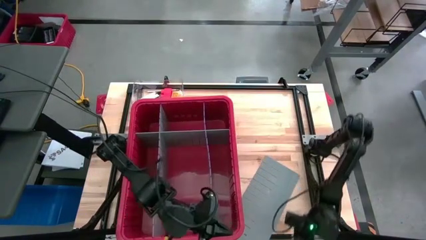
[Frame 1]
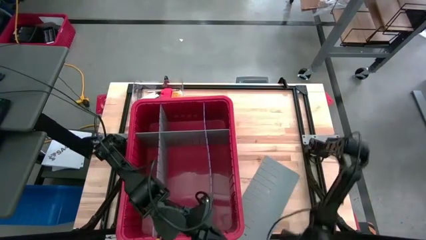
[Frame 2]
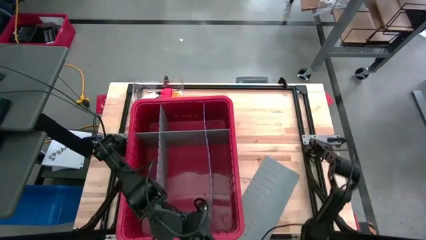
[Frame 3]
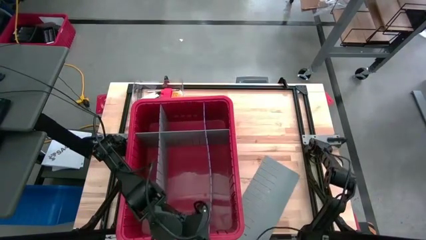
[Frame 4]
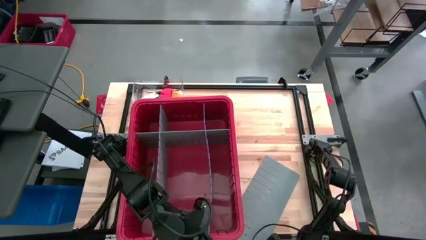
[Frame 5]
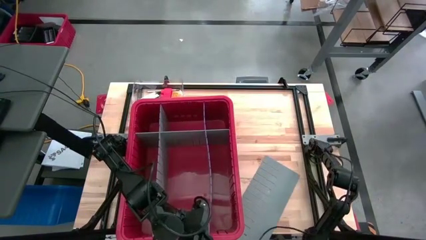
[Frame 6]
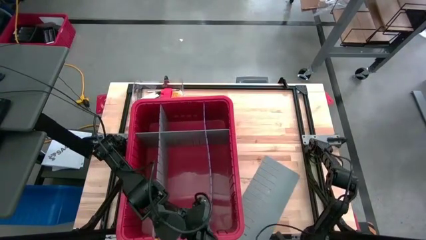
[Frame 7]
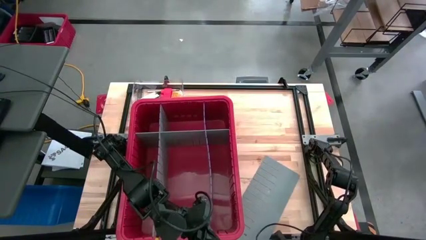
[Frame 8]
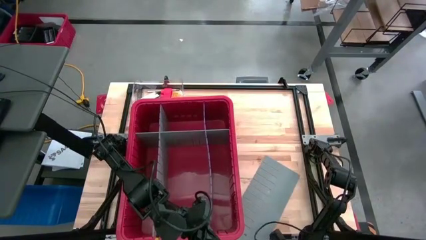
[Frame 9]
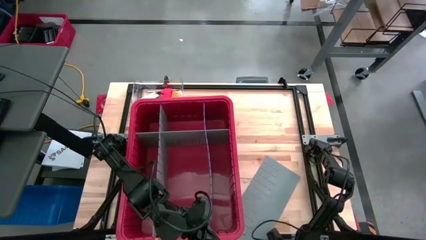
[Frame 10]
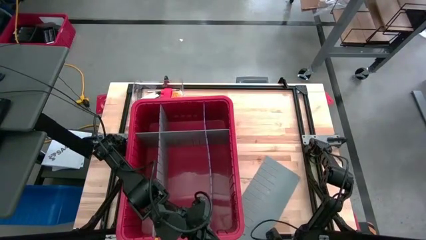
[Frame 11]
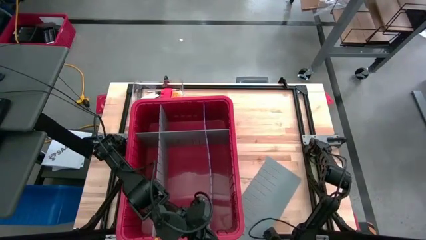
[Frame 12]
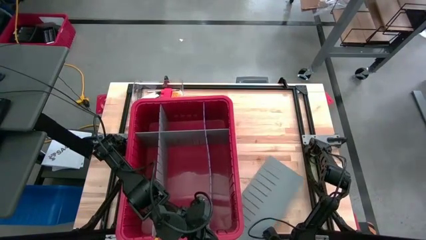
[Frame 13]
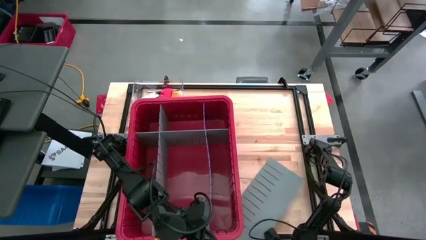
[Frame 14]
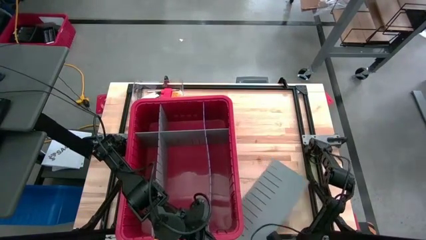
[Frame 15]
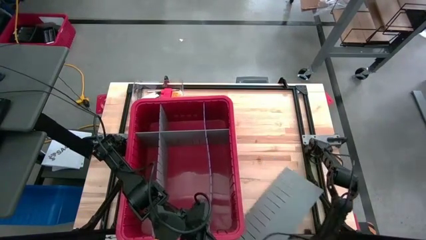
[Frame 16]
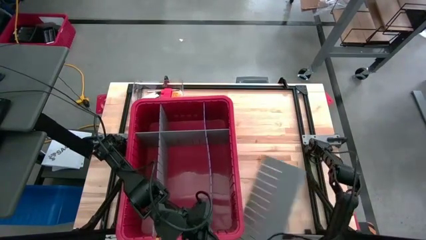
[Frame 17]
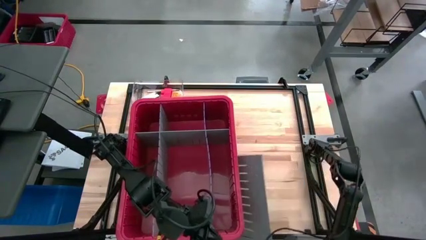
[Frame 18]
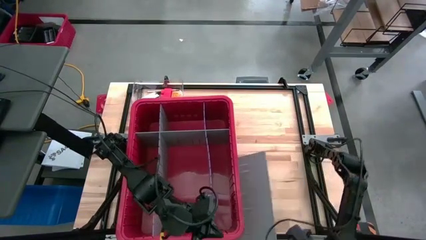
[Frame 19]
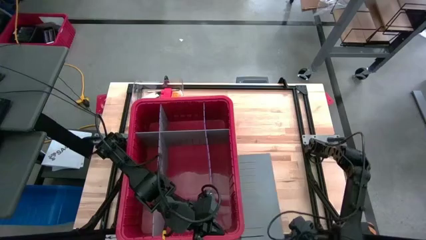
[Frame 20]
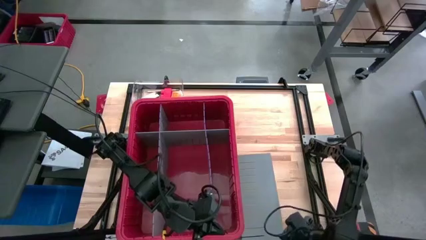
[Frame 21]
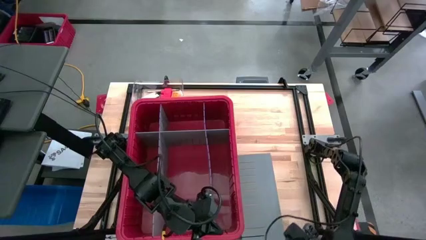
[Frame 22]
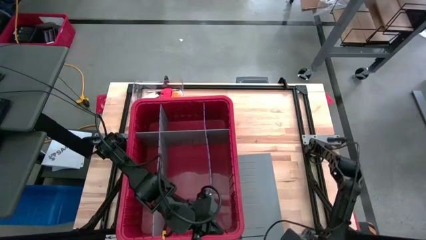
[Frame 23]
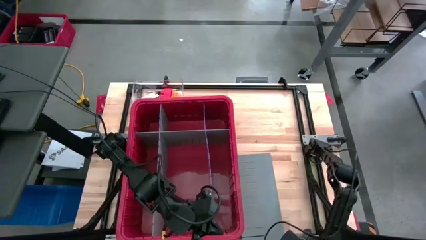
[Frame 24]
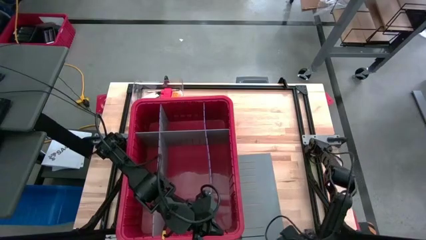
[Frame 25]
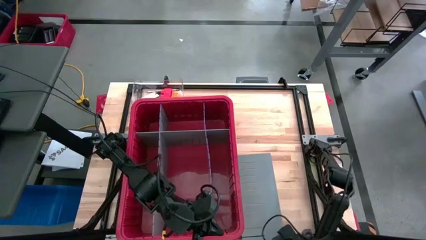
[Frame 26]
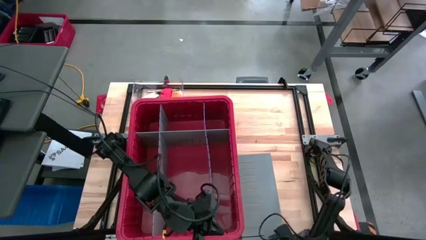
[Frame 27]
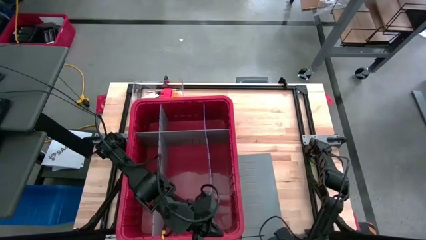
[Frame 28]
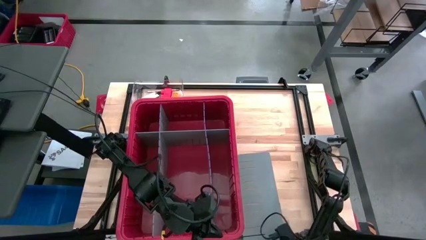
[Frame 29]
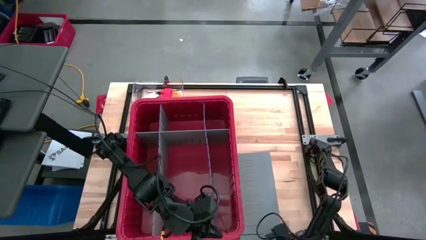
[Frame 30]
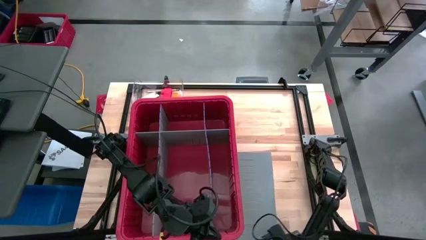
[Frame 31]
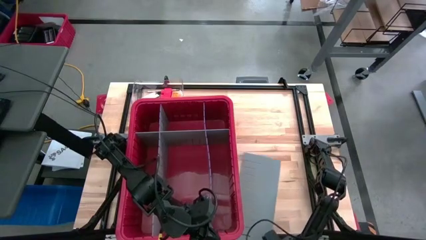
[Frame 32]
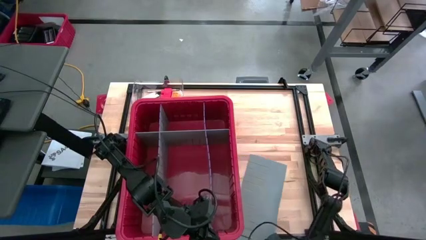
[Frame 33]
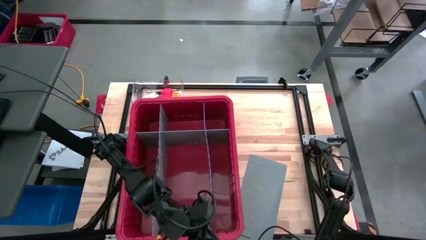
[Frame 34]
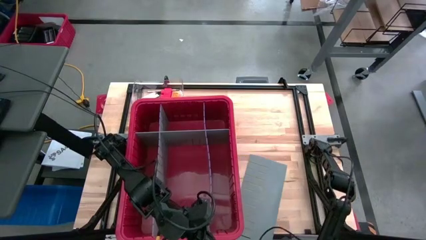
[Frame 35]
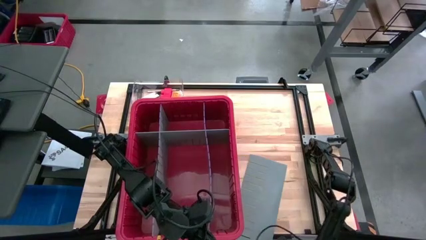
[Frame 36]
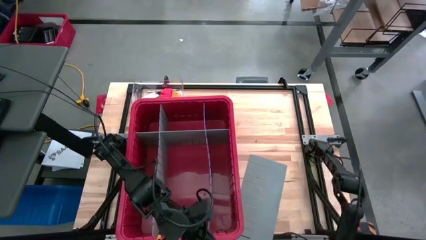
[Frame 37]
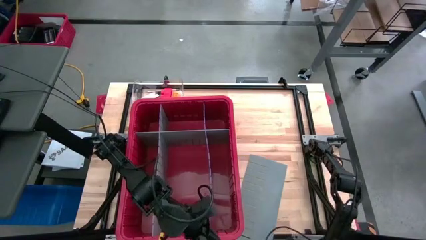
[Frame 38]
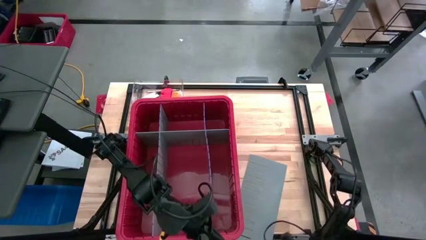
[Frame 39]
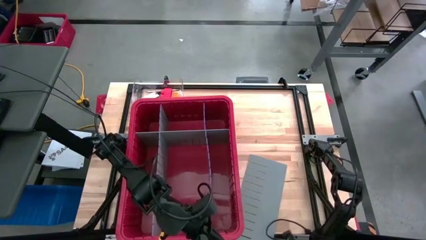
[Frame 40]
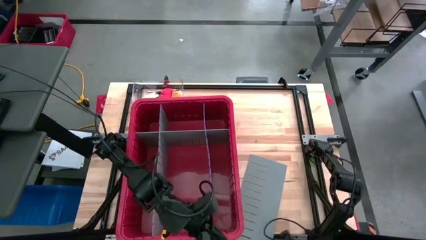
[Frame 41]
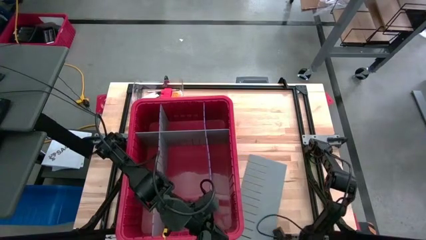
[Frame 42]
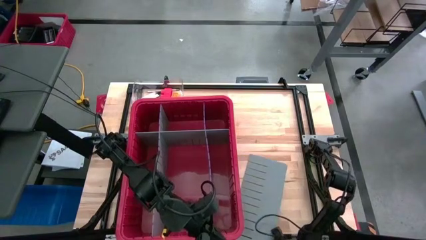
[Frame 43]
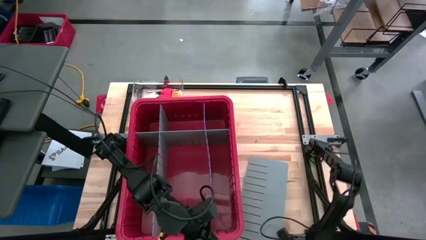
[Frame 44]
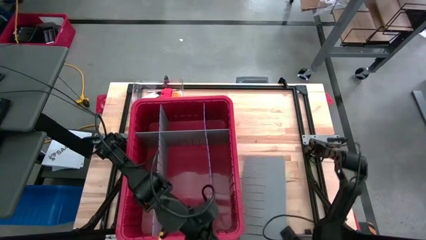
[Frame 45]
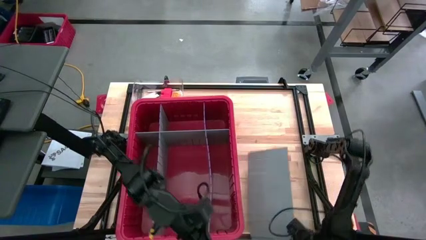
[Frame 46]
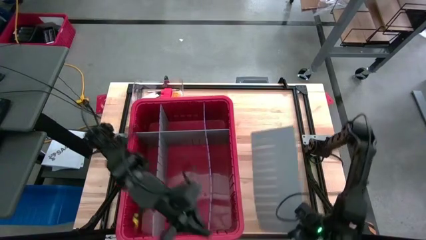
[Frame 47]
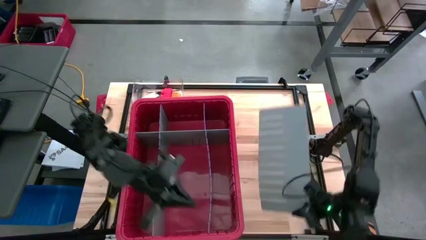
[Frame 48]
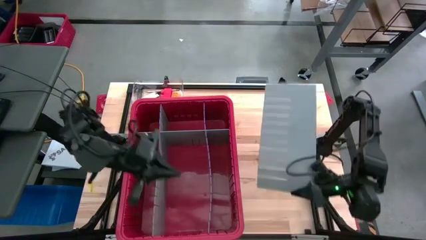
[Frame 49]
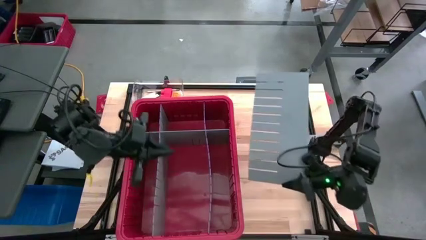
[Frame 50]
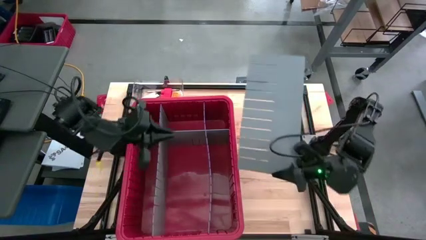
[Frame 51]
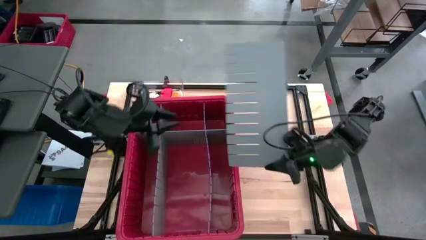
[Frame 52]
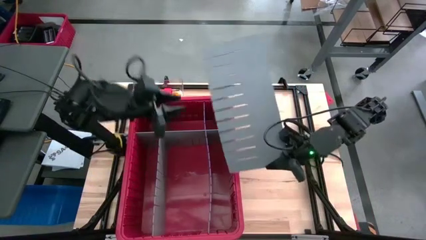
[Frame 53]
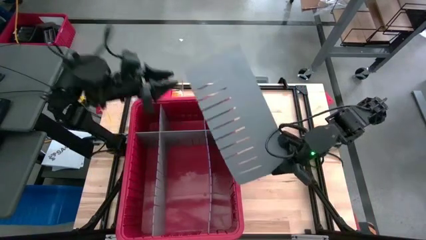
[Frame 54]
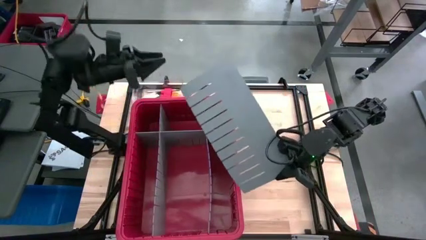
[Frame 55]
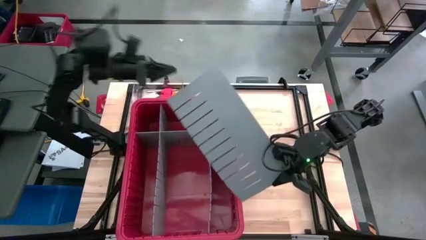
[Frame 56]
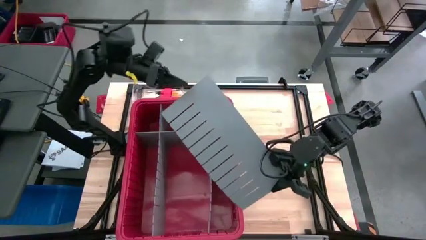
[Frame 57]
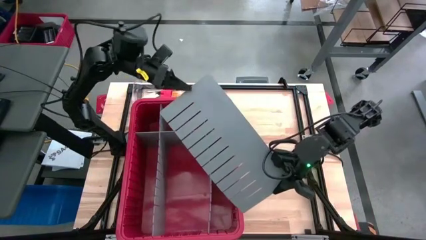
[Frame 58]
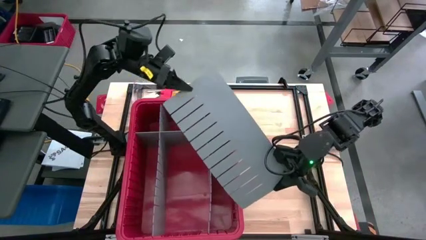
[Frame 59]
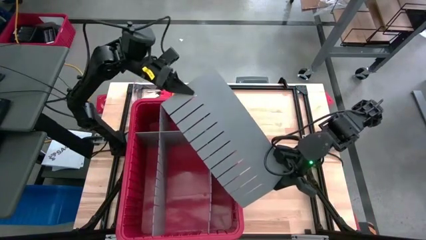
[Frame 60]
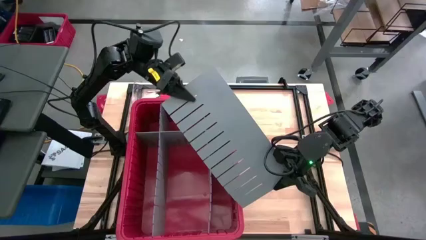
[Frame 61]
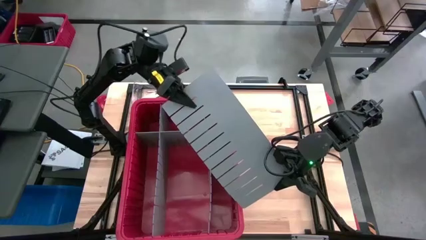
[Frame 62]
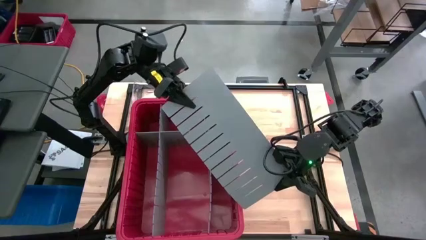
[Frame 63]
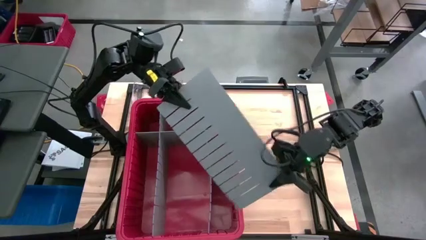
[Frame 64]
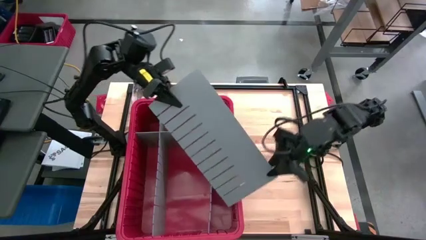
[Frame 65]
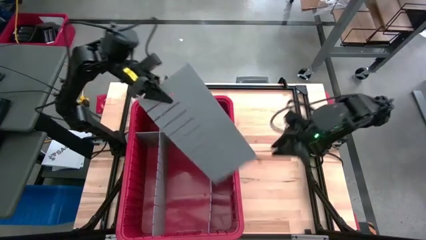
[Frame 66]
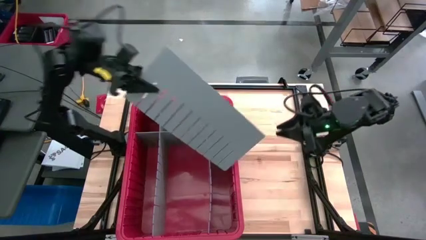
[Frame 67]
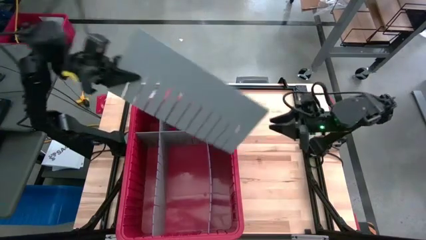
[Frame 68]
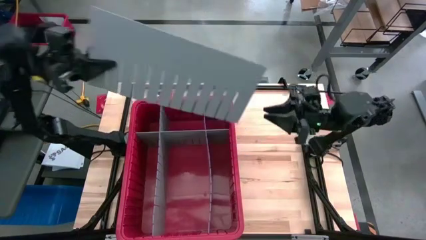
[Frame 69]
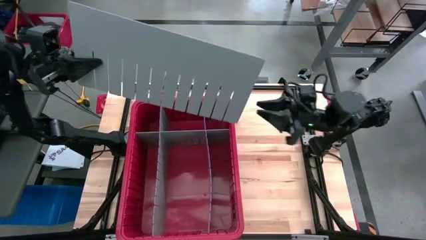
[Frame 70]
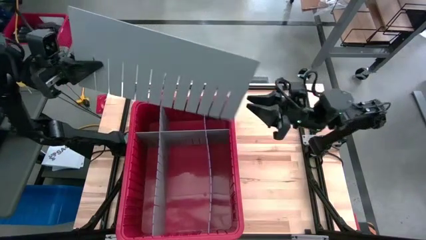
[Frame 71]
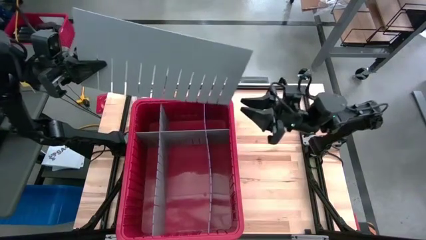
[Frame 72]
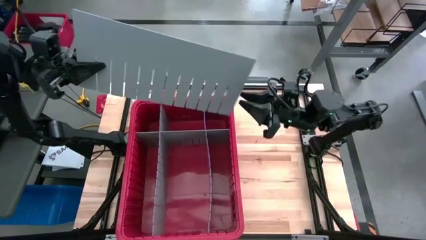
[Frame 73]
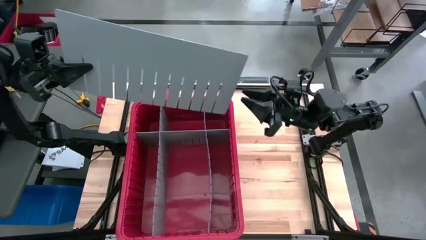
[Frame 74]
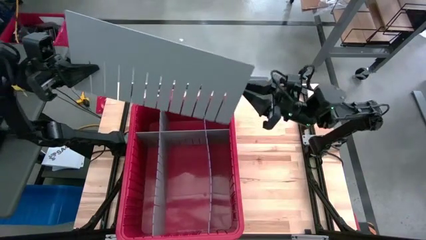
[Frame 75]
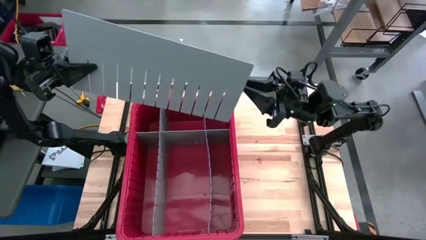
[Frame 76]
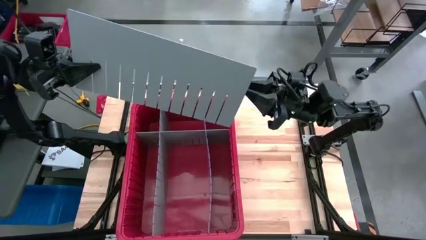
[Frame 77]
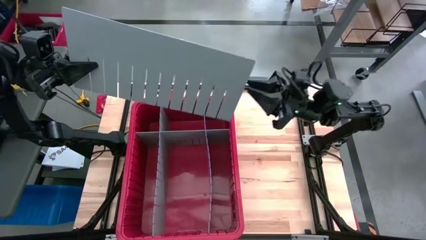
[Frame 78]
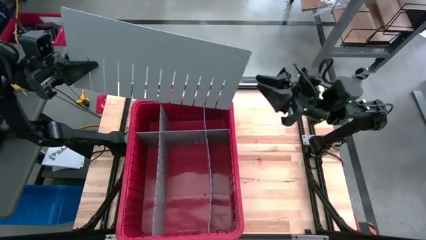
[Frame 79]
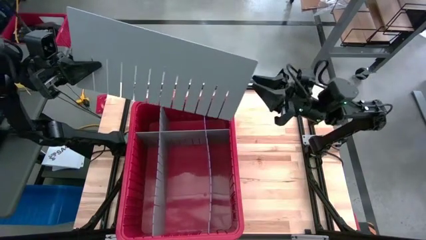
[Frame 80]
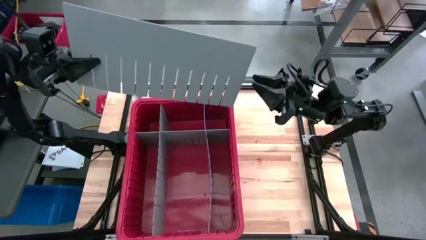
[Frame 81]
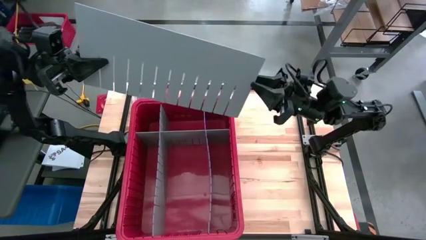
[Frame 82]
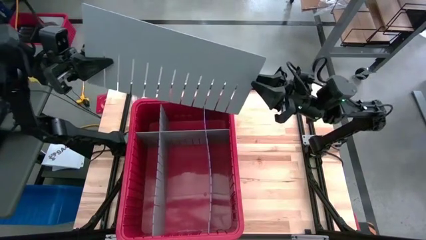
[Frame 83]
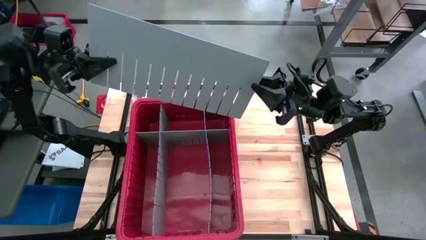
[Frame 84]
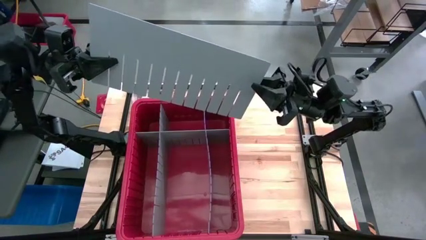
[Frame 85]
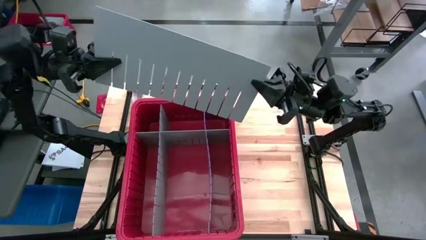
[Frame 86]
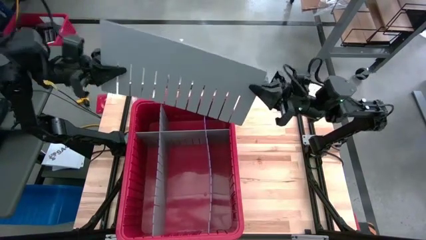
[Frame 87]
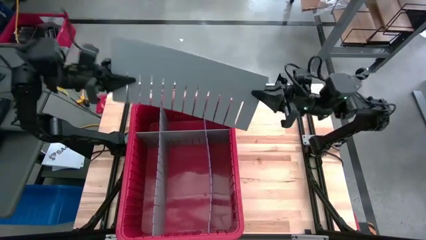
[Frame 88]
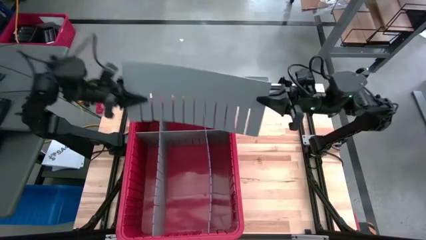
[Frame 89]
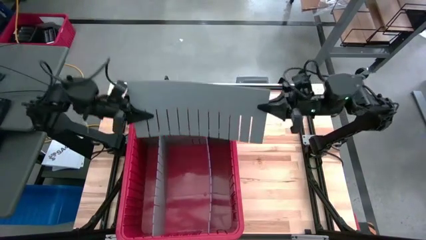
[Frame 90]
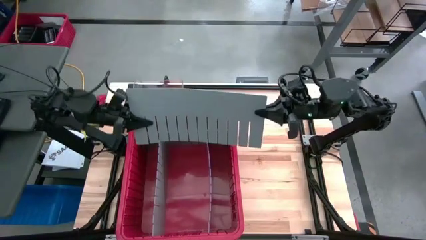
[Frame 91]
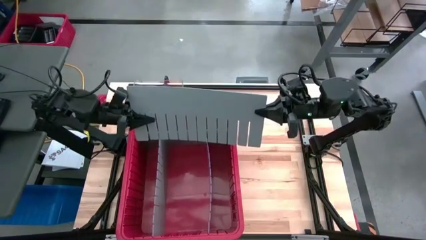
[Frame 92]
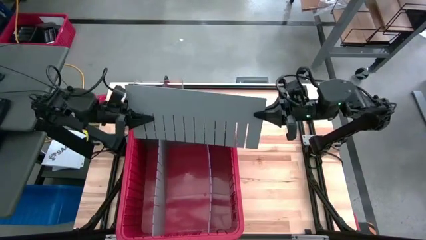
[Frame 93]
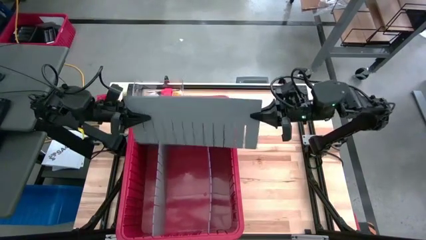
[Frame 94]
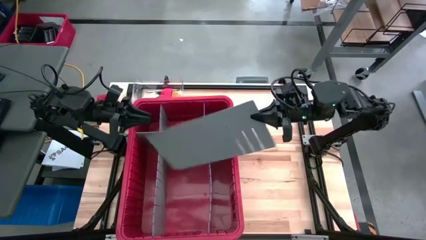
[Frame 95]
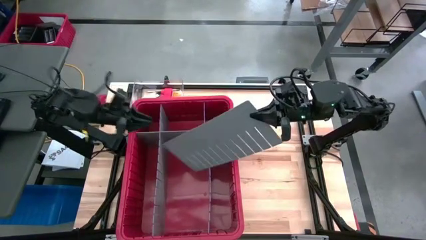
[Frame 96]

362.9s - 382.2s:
Task: Sort blocks
Assemble the bin divider into the red bin
